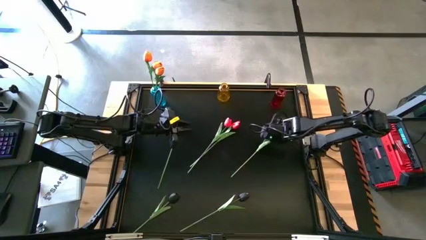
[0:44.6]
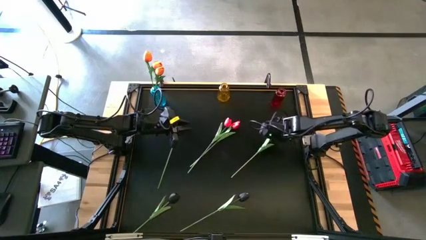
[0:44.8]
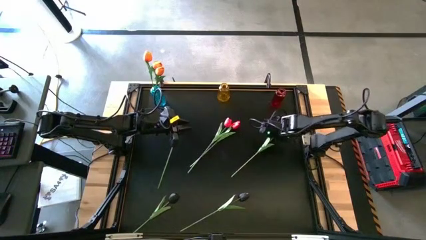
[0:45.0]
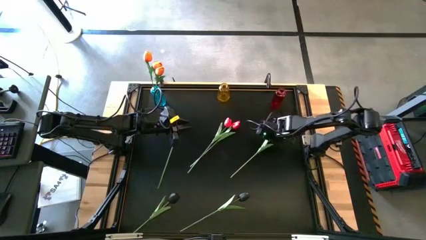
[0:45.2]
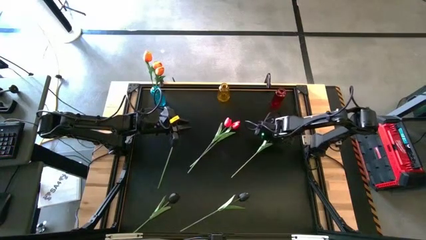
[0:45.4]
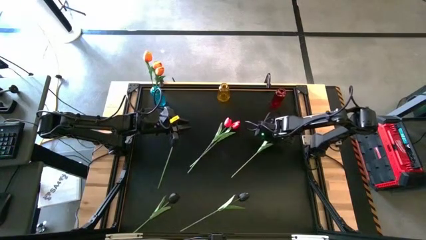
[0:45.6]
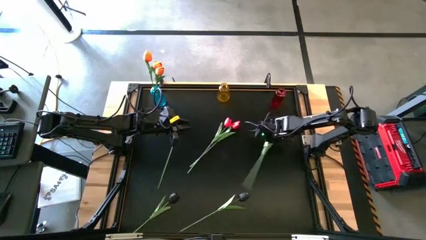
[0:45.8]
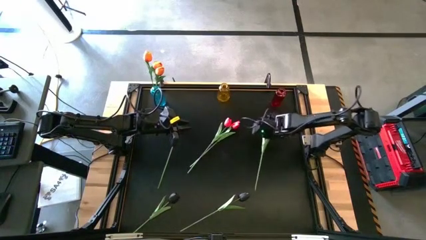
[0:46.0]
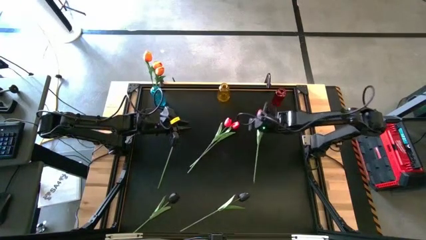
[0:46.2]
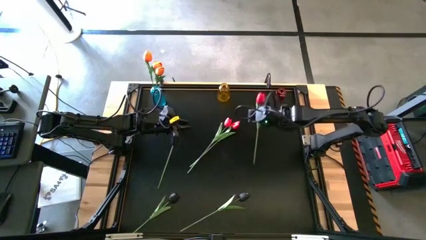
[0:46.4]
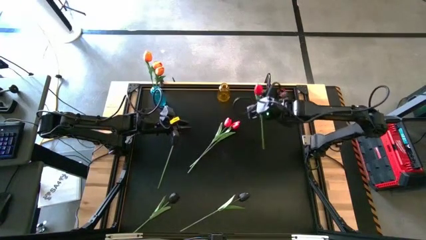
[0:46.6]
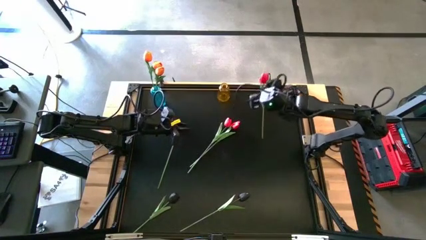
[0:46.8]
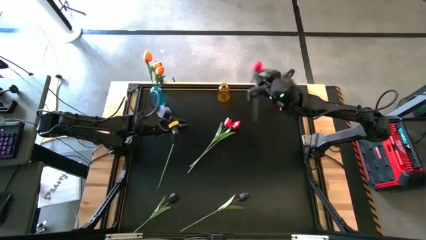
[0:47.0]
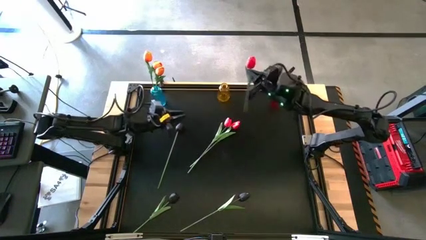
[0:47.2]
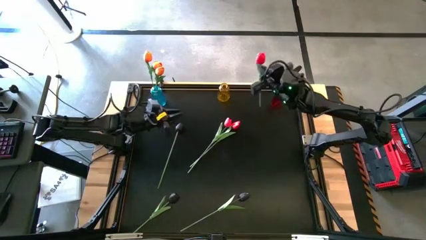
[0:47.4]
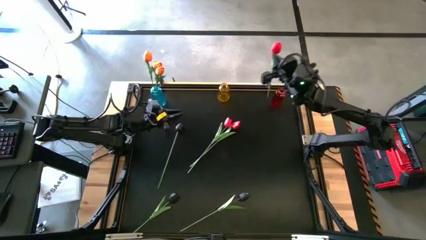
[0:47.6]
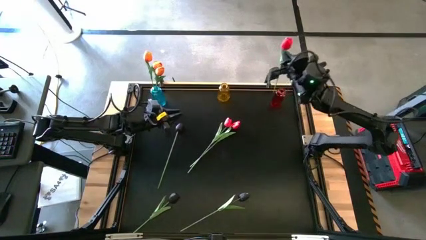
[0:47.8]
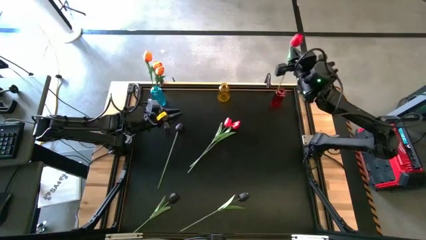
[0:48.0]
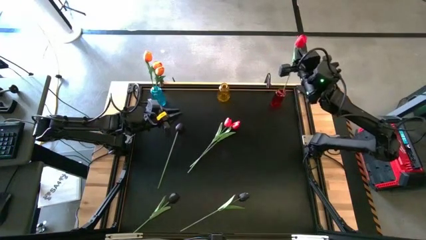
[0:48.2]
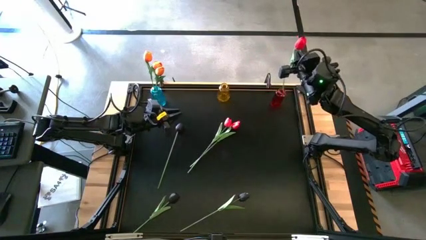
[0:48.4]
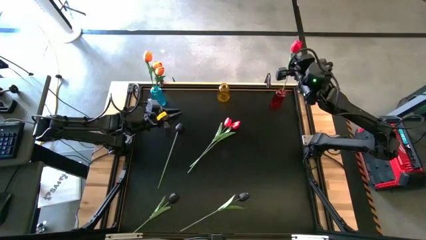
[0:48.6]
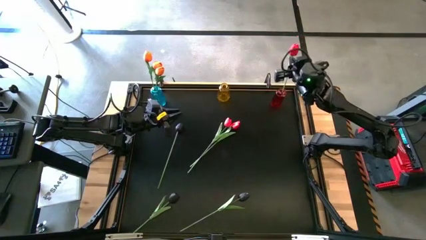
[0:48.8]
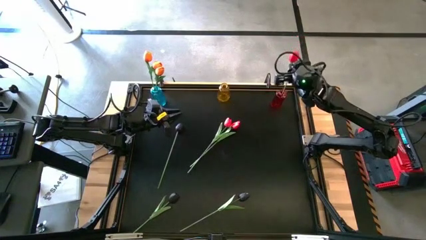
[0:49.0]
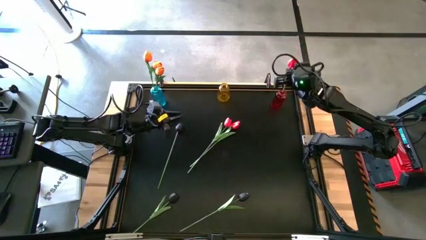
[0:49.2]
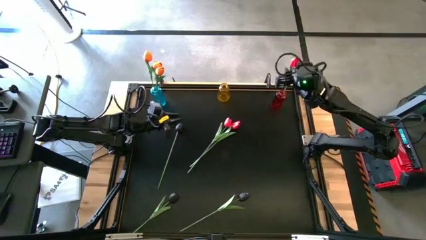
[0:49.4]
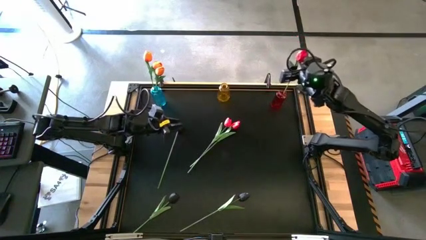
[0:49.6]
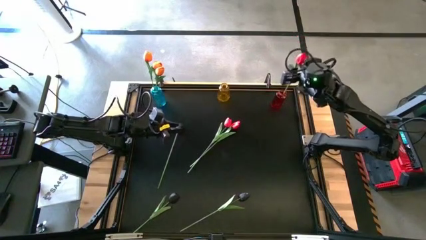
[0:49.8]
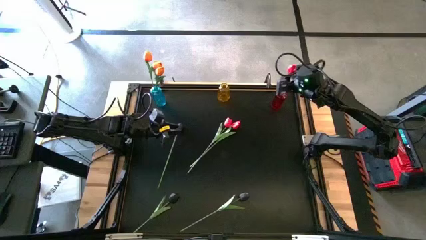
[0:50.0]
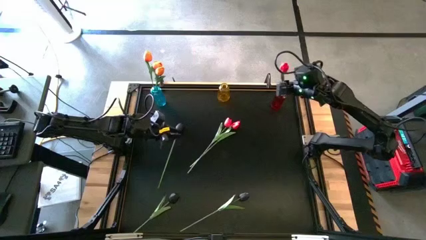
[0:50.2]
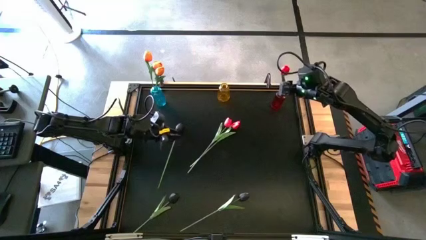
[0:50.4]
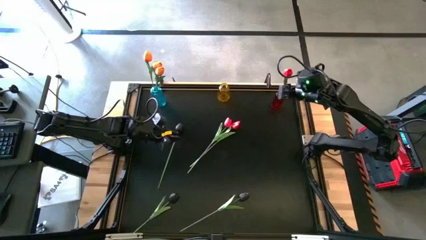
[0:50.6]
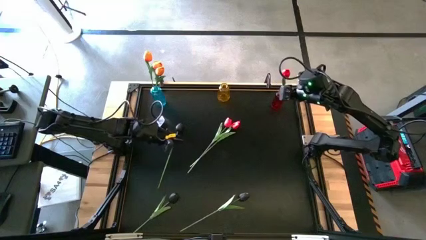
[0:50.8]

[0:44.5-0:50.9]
Task: Sort flowers into vase by color
Put the right red flower into the red vase

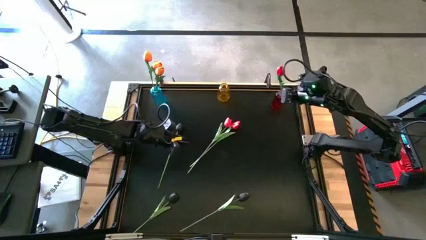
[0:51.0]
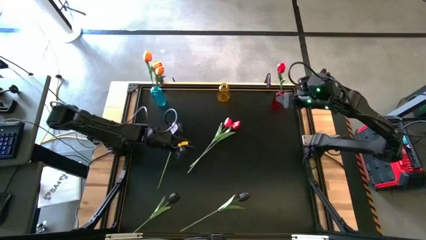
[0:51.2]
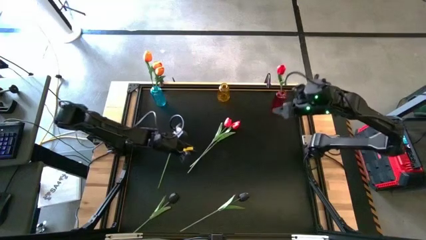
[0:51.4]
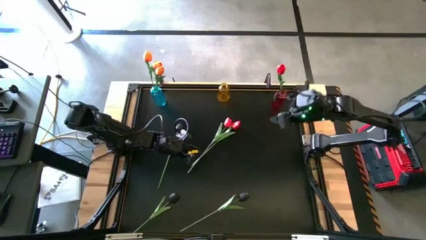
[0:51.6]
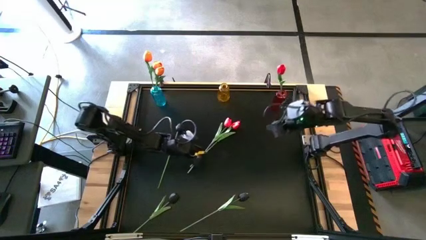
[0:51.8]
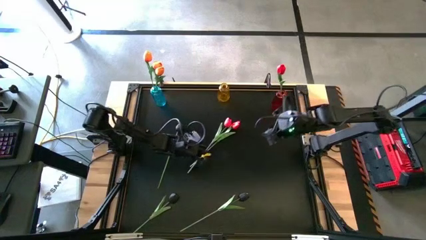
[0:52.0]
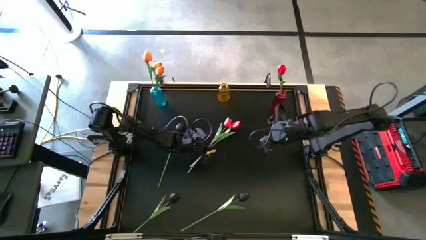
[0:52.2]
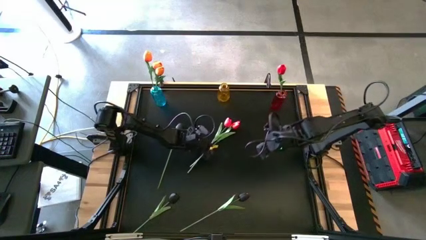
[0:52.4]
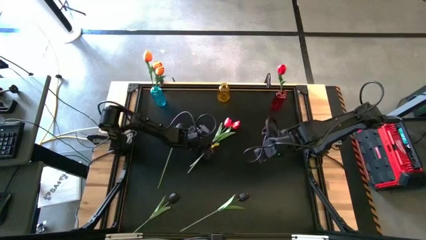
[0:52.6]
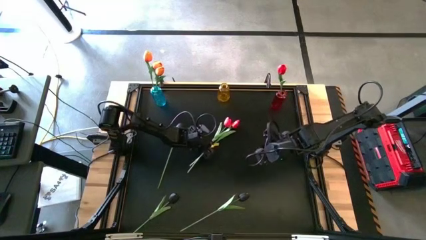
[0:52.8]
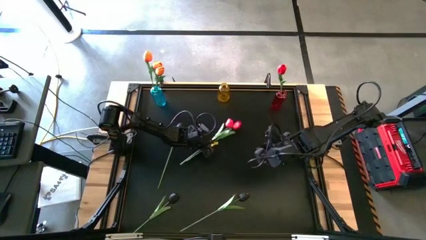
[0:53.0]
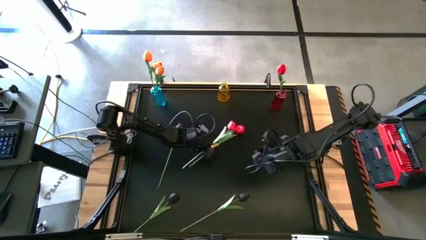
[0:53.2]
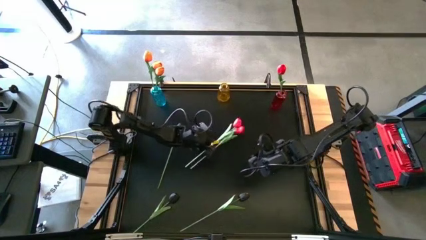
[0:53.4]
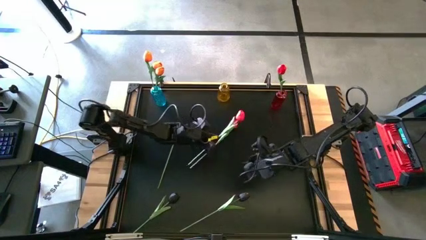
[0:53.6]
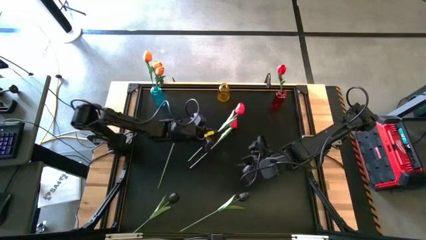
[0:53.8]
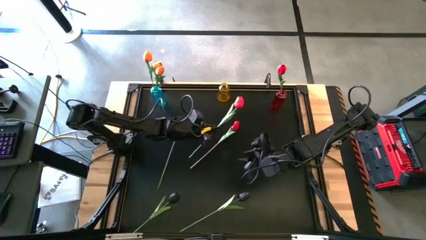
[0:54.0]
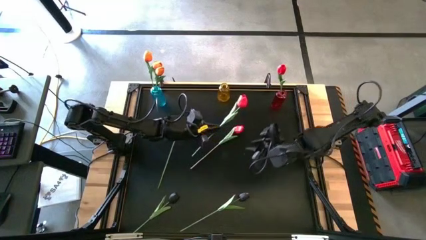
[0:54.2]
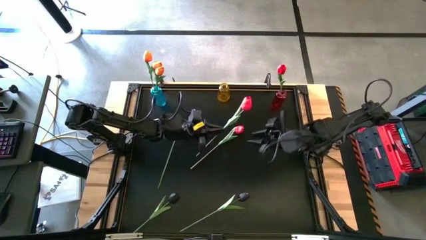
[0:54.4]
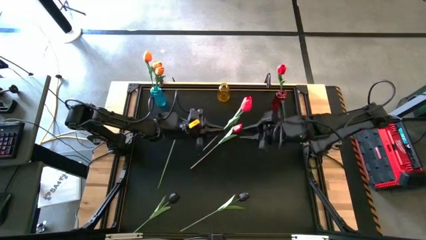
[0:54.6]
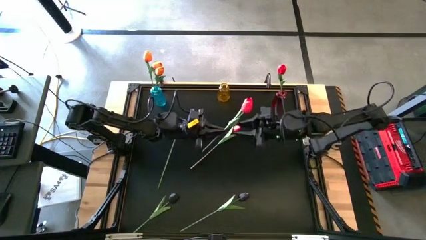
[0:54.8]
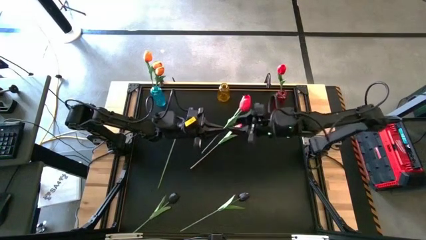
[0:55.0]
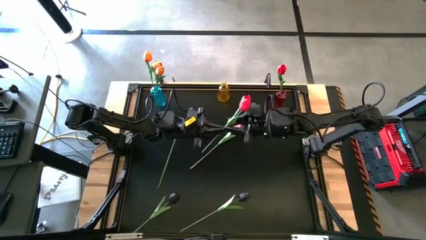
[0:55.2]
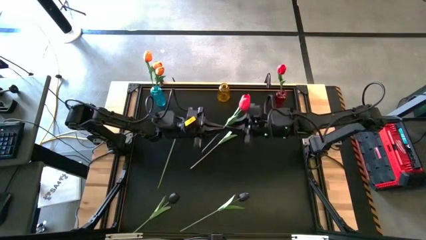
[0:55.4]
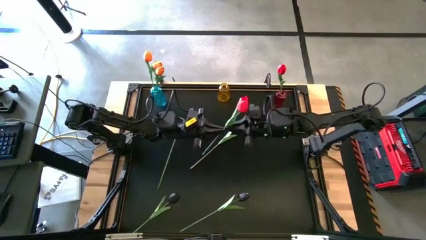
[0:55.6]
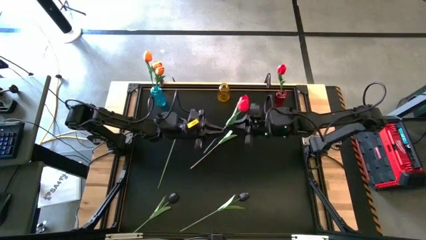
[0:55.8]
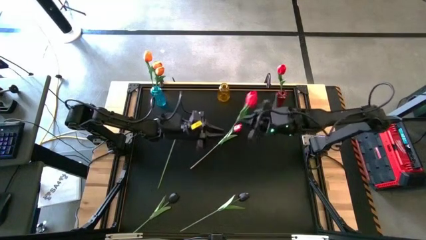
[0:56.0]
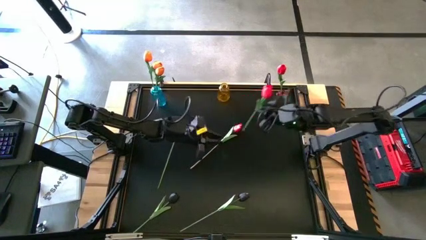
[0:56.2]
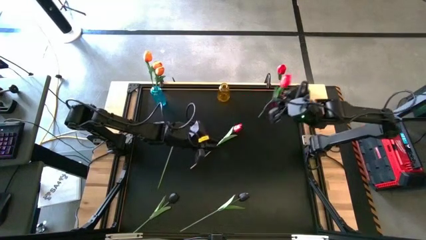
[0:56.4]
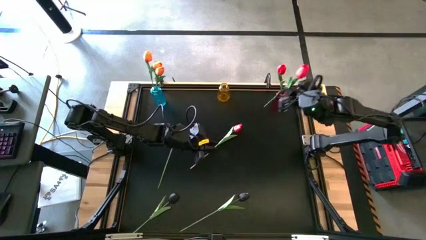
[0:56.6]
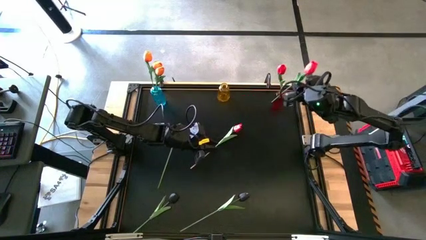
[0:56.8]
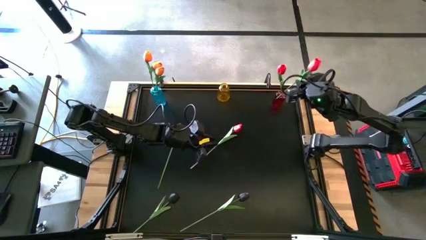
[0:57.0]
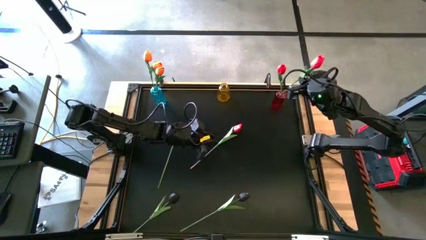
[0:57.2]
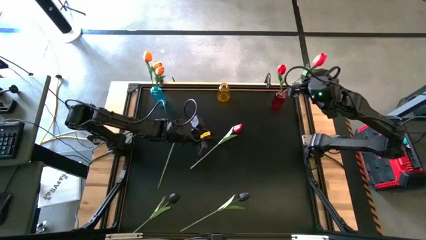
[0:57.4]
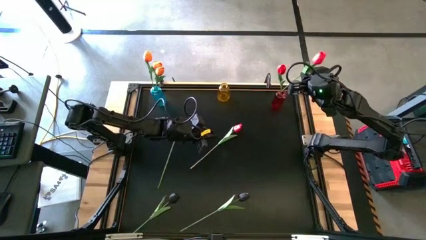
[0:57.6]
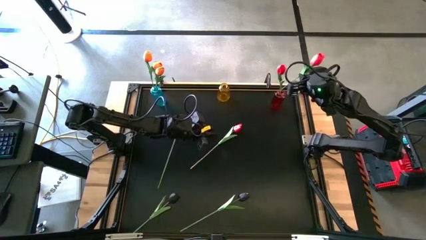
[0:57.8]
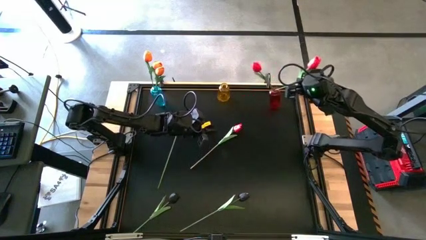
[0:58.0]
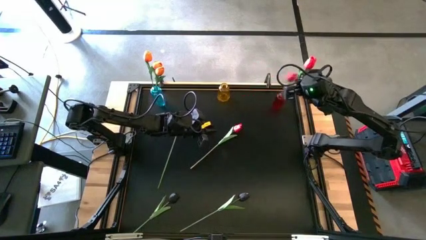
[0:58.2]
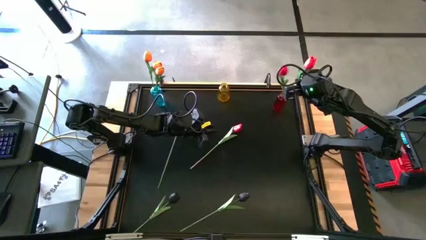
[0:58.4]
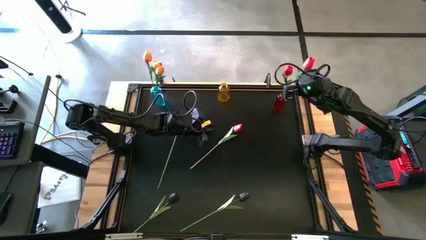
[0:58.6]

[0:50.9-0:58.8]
Put the left red flower into the red vase
